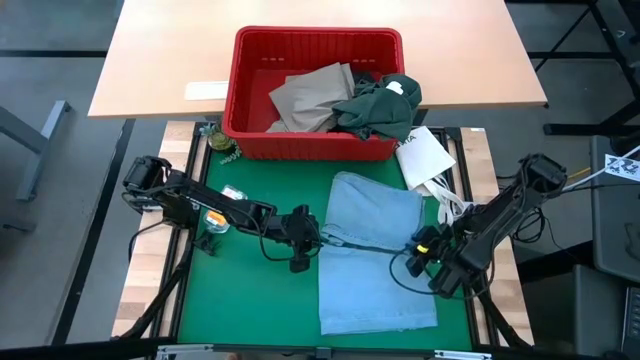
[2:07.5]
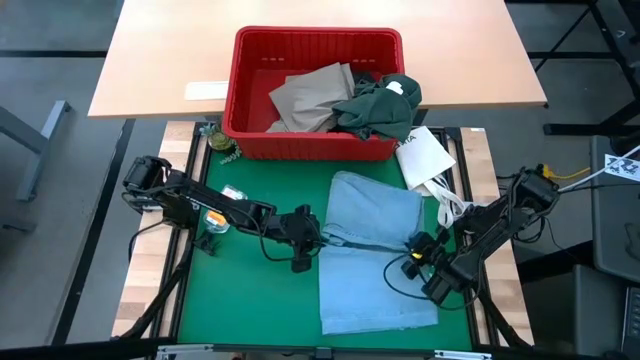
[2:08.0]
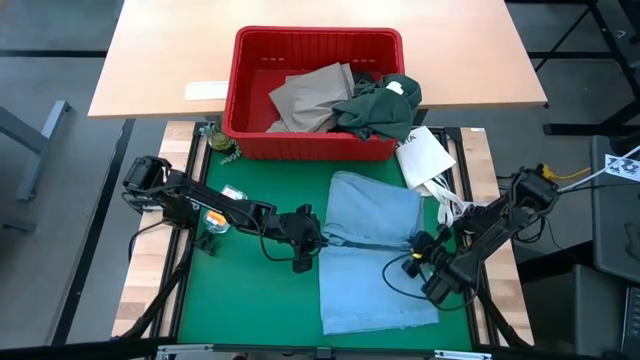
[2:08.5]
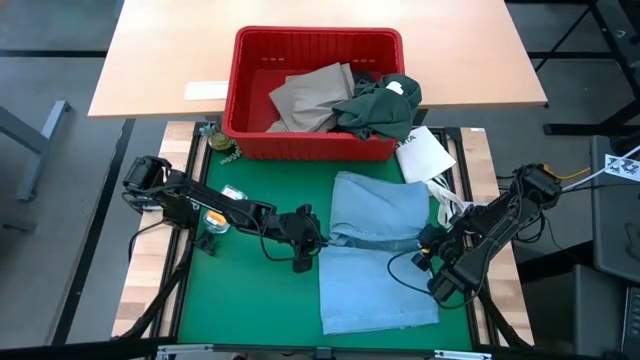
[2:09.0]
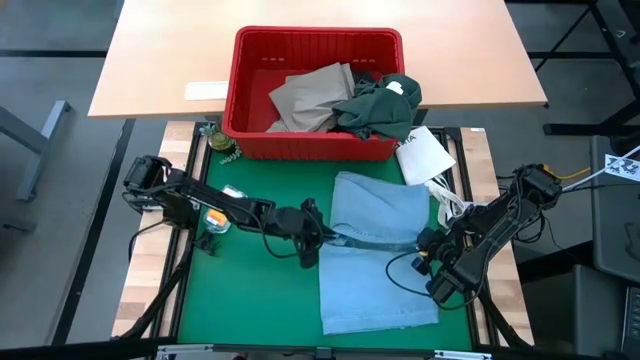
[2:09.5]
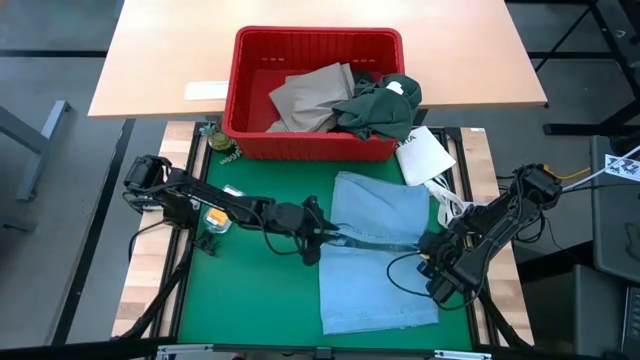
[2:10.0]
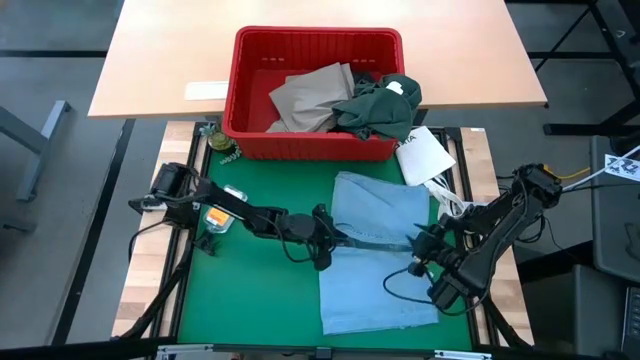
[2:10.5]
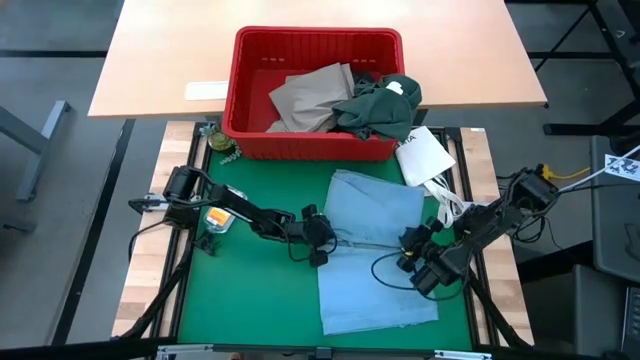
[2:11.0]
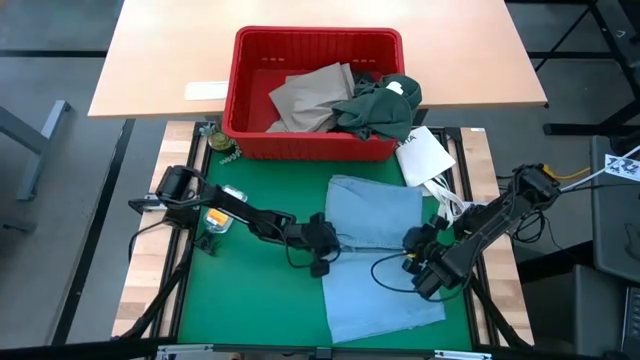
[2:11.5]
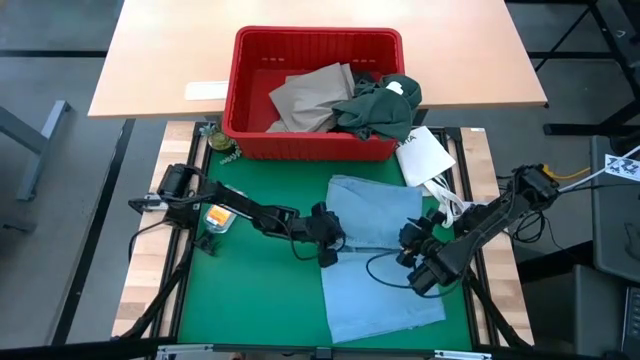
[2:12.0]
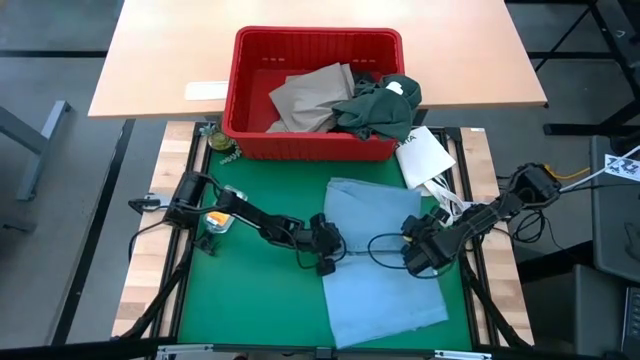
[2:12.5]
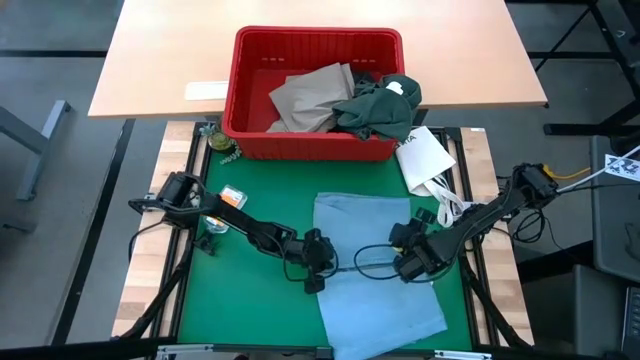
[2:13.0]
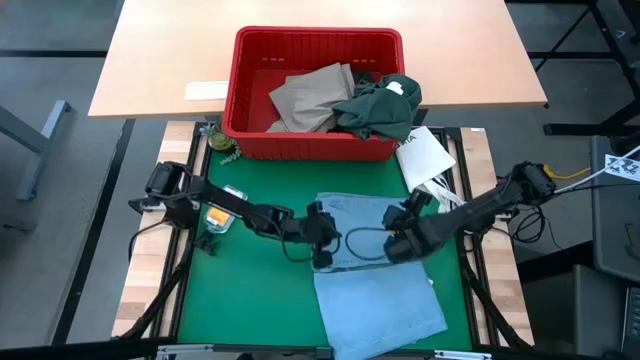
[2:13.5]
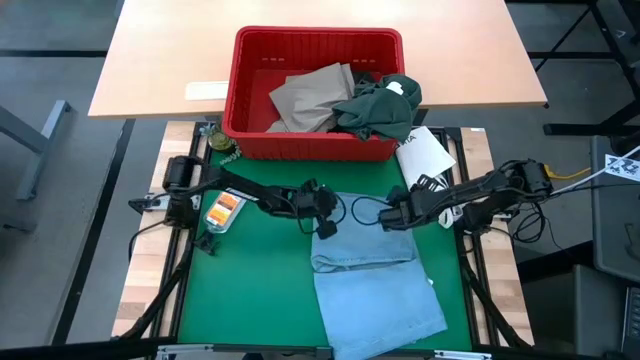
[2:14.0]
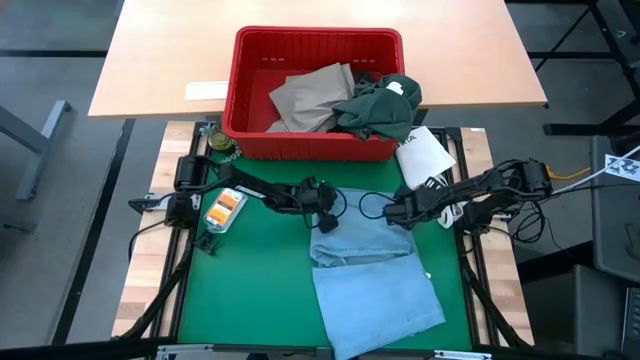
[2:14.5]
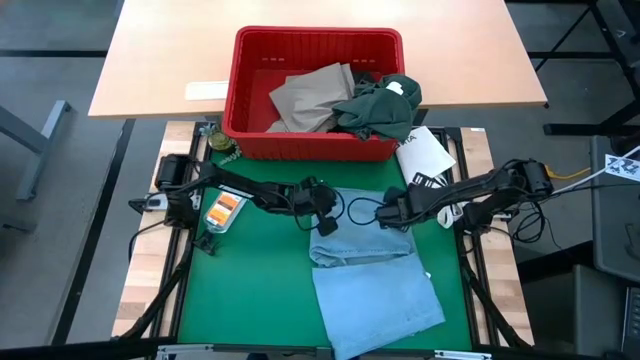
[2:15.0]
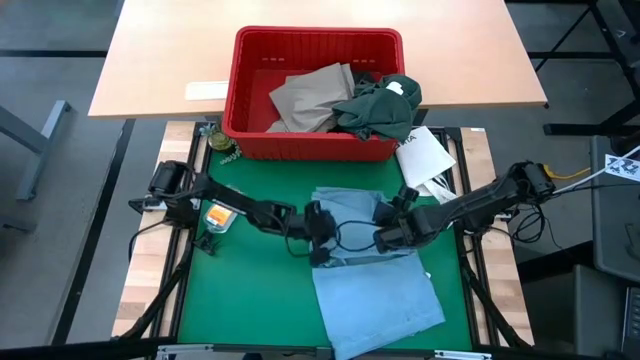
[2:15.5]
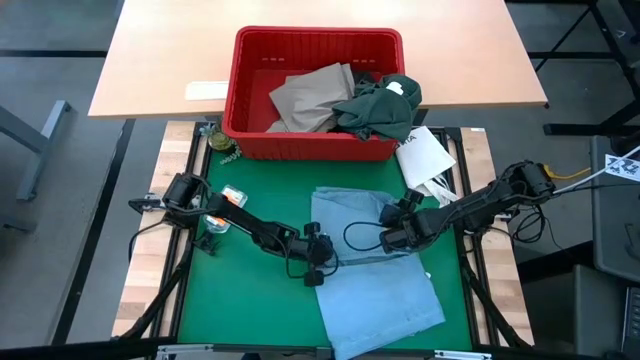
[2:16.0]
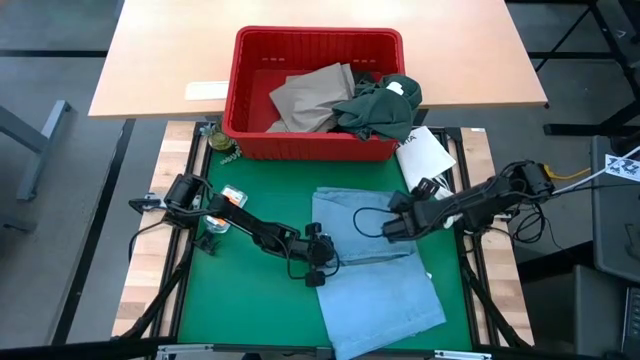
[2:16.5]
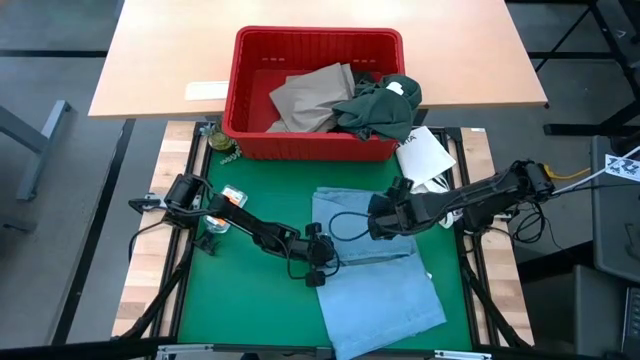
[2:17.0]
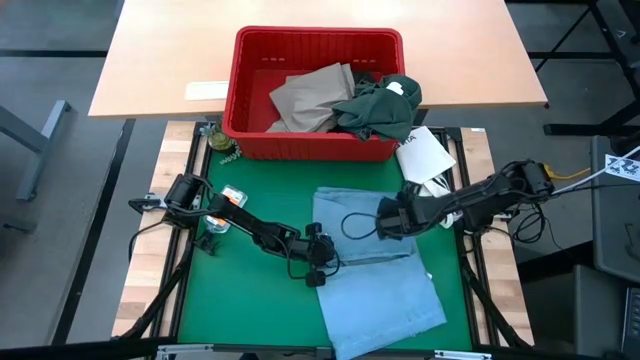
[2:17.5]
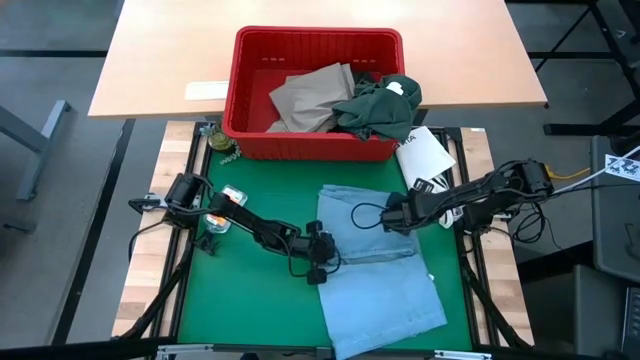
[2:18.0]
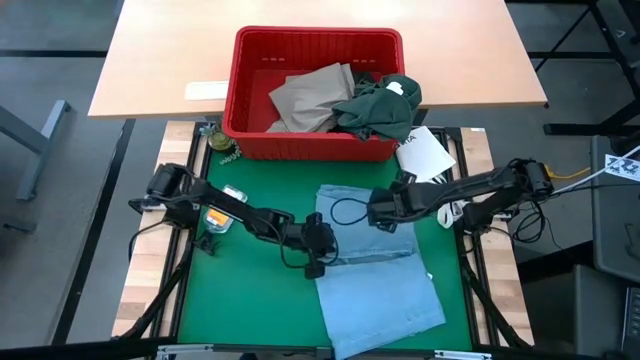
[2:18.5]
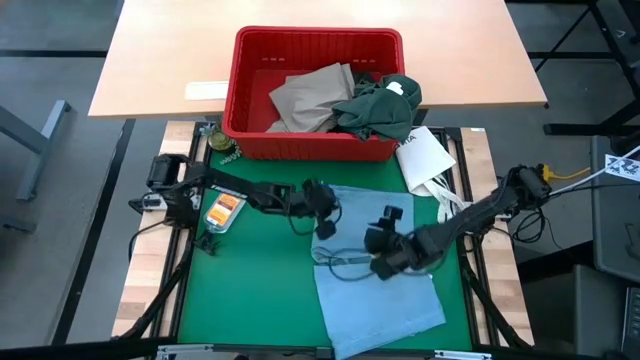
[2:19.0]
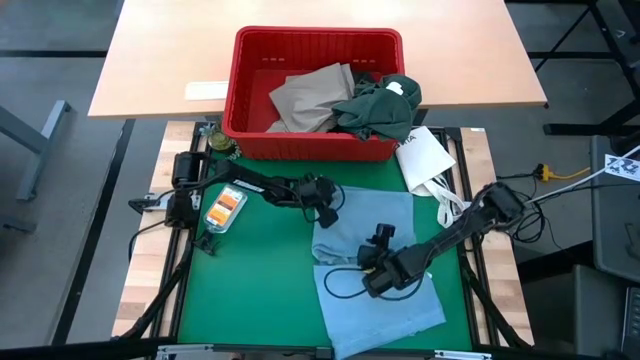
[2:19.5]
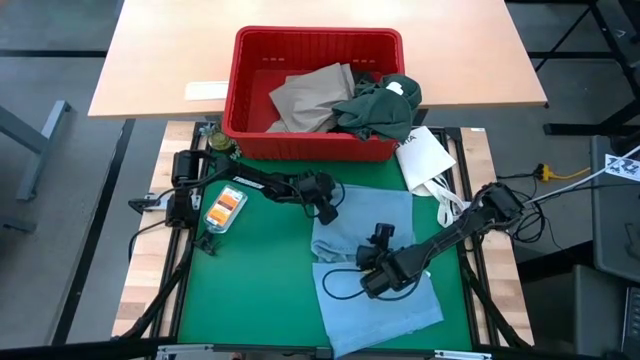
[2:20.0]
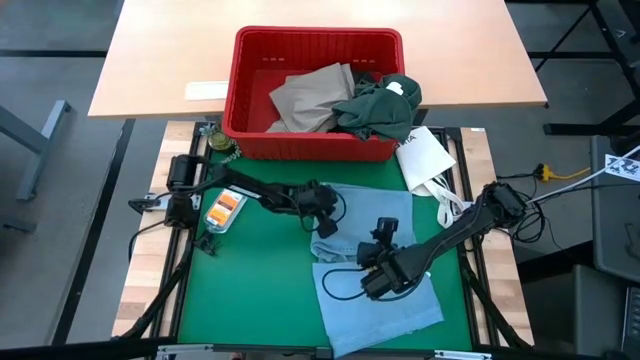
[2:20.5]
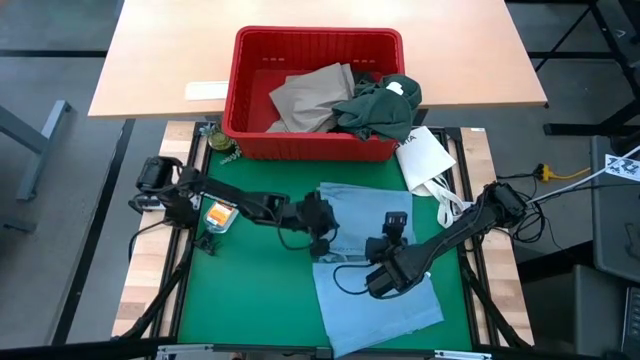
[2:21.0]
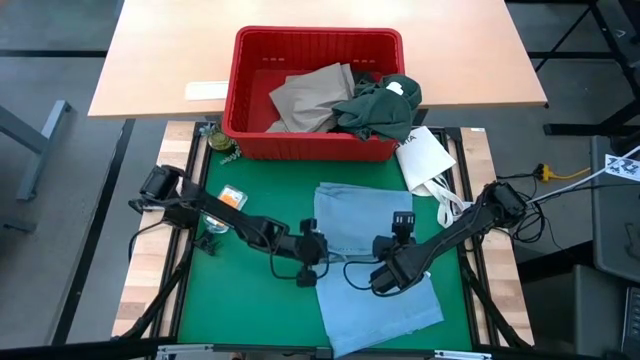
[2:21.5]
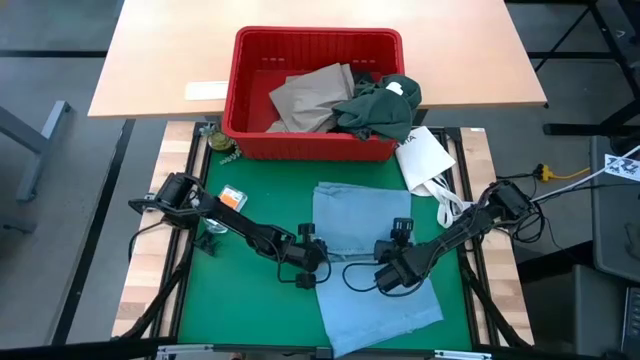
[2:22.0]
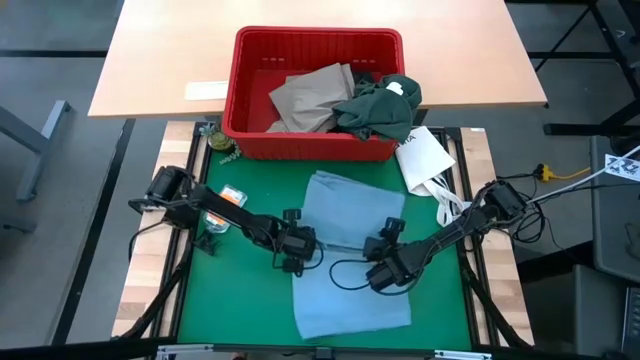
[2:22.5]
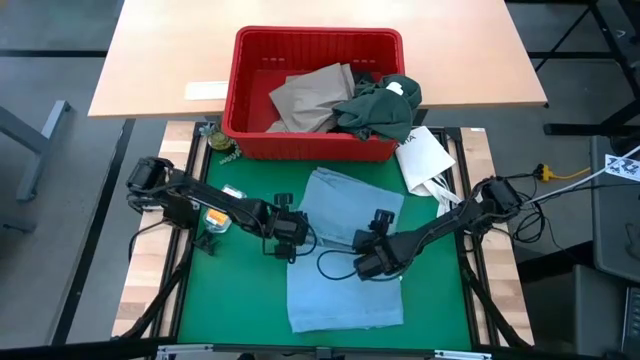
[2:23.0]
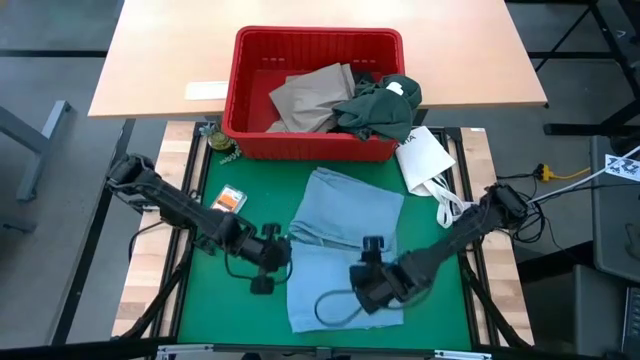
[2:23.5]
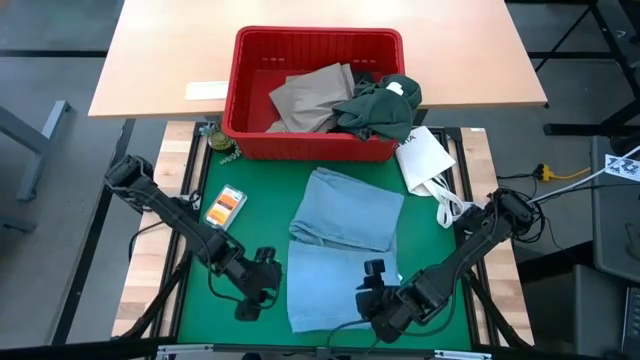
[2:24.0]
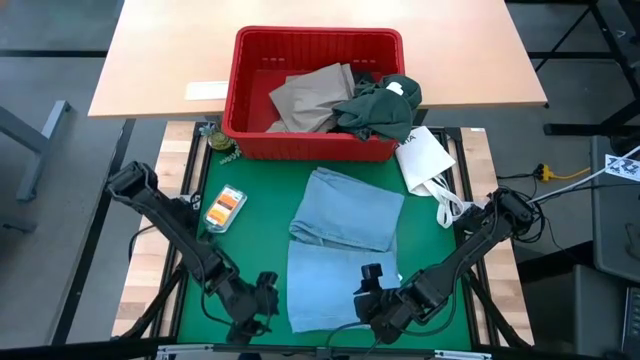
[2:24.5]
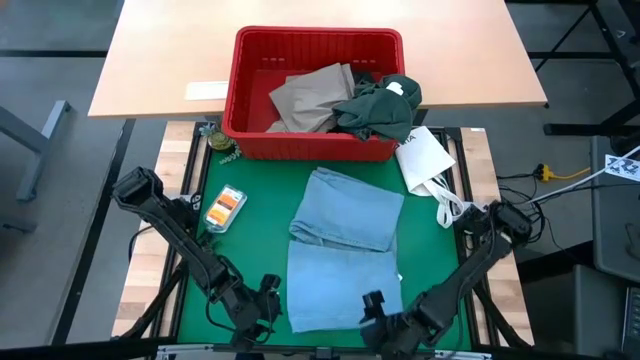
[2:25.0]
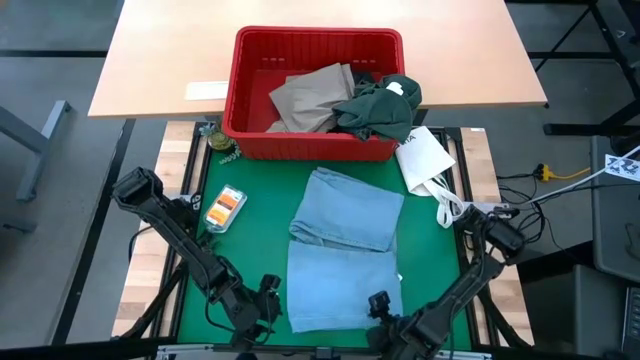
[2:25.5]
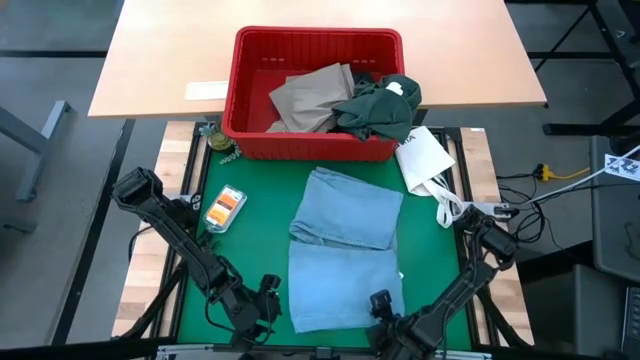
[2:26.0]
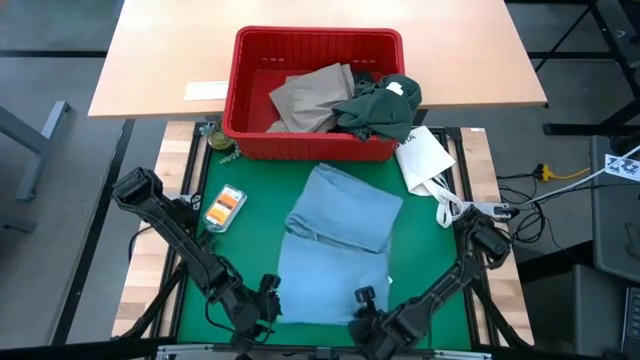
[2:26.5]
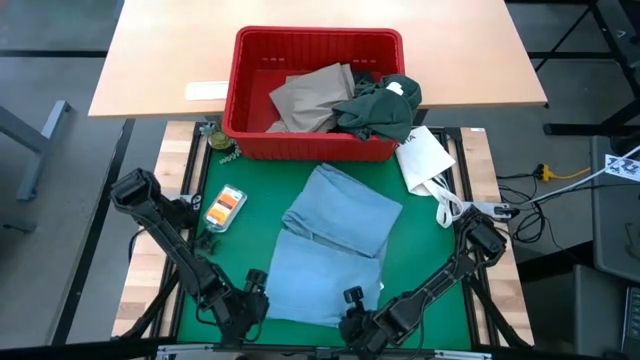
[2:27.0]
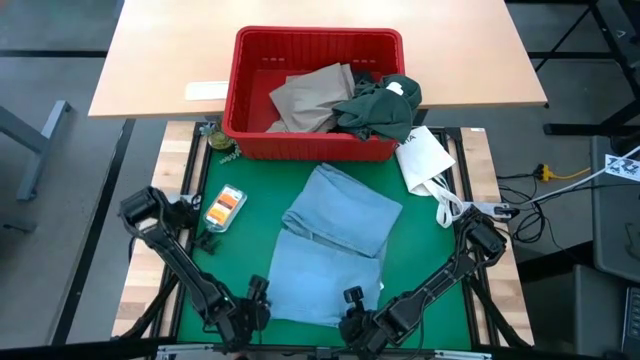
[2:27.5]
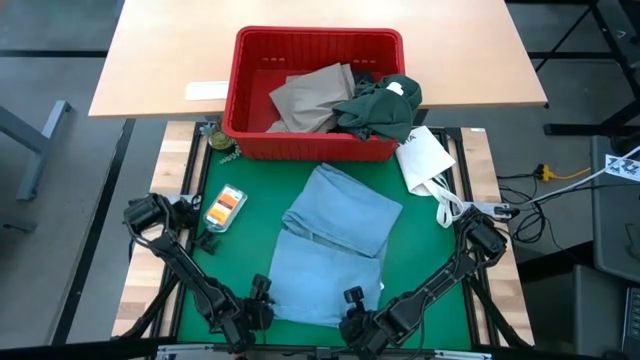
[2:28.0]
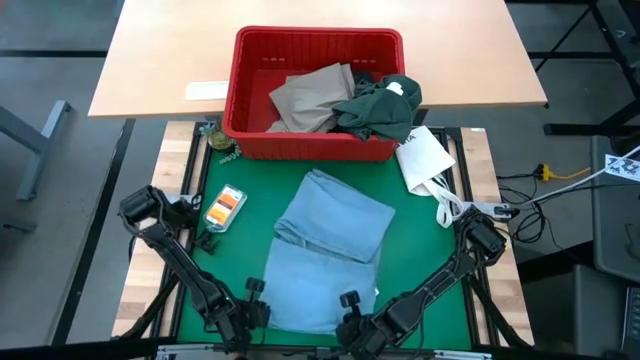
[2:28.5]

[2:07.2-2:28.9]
Task: Fold Laundry from Bin
Fold the blue pants
